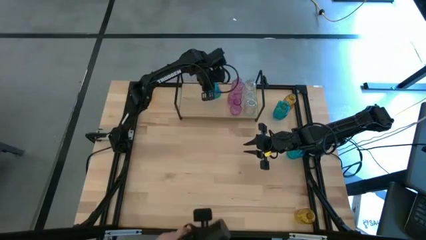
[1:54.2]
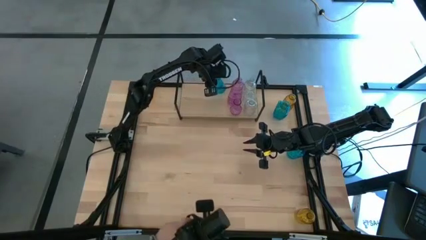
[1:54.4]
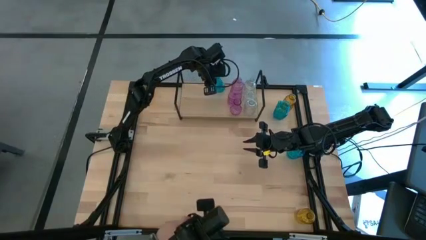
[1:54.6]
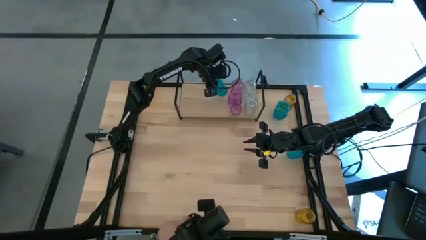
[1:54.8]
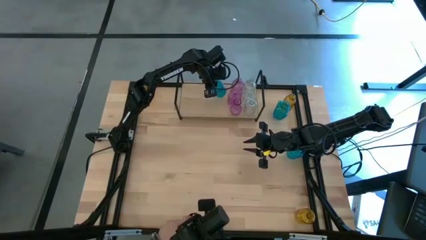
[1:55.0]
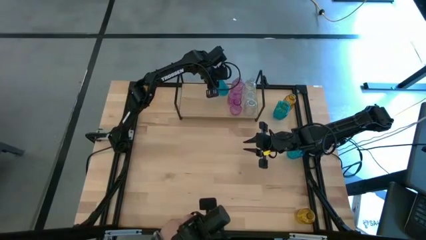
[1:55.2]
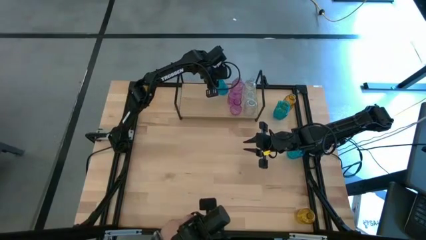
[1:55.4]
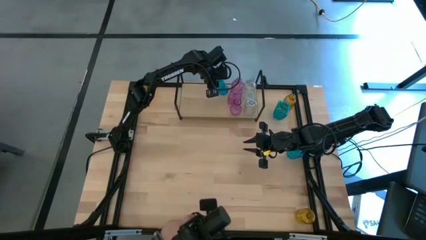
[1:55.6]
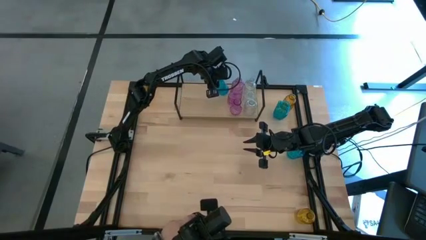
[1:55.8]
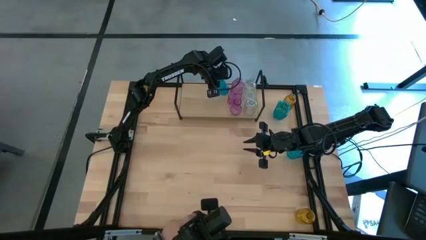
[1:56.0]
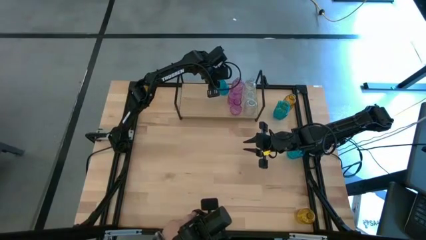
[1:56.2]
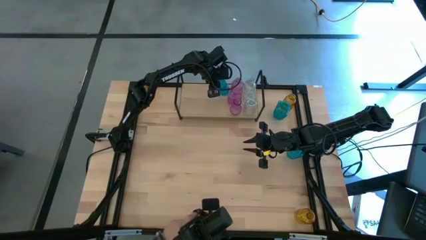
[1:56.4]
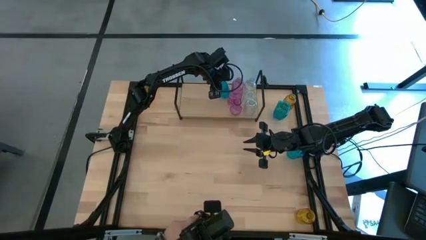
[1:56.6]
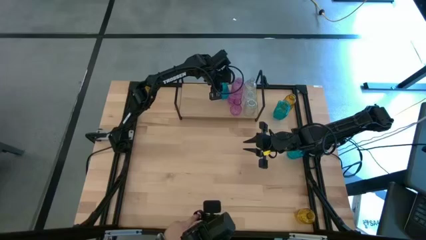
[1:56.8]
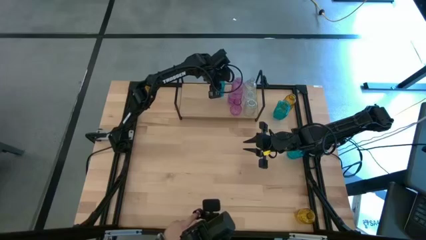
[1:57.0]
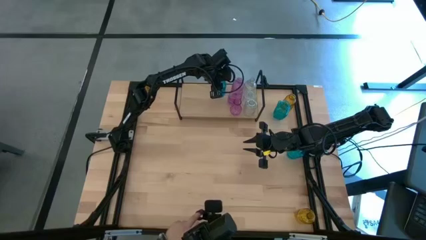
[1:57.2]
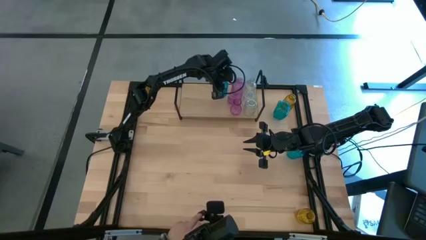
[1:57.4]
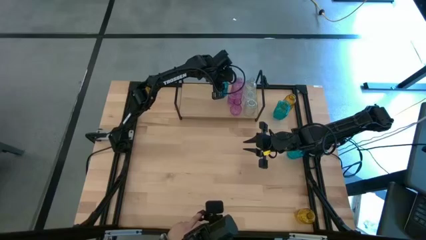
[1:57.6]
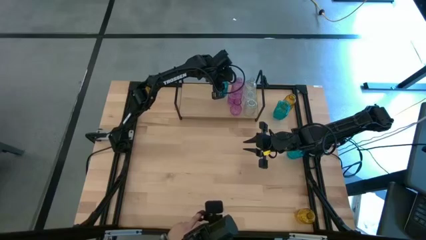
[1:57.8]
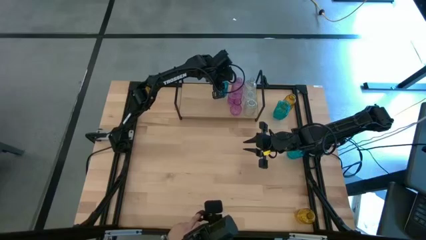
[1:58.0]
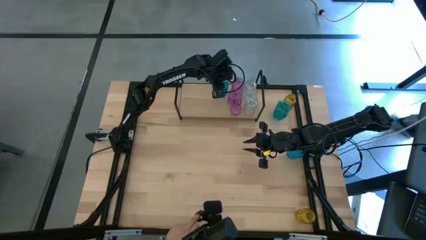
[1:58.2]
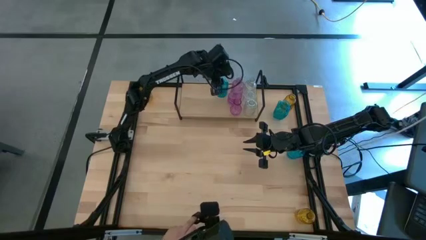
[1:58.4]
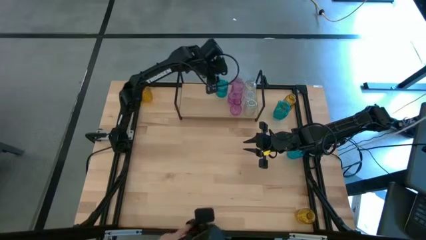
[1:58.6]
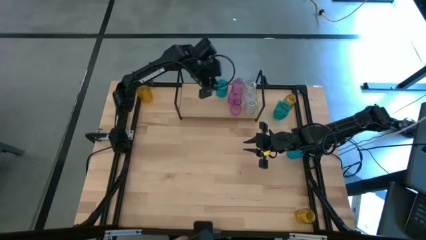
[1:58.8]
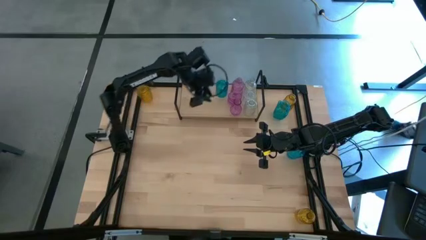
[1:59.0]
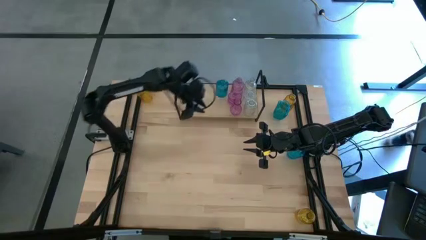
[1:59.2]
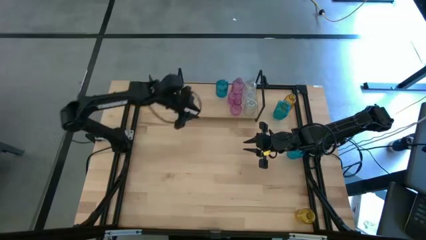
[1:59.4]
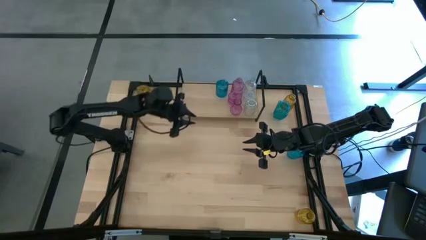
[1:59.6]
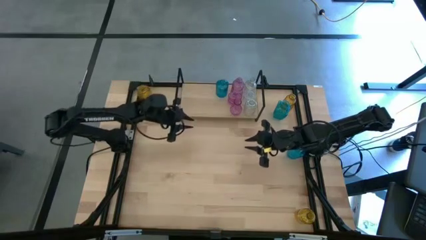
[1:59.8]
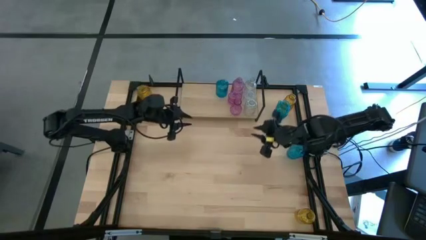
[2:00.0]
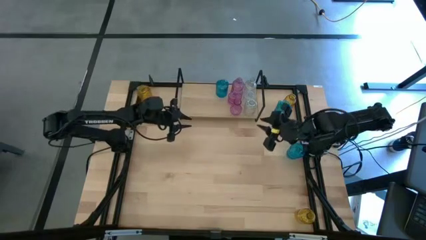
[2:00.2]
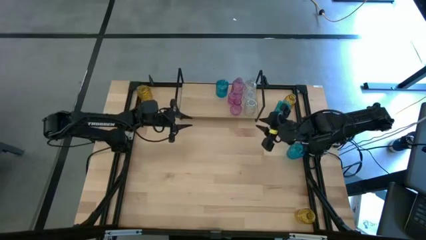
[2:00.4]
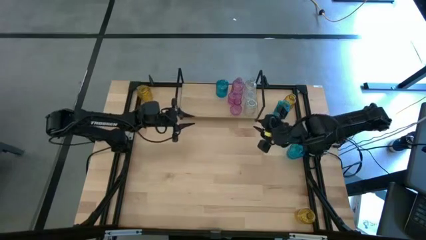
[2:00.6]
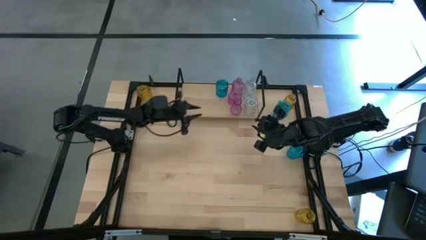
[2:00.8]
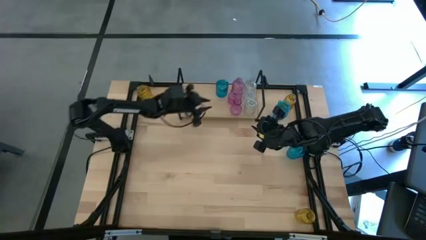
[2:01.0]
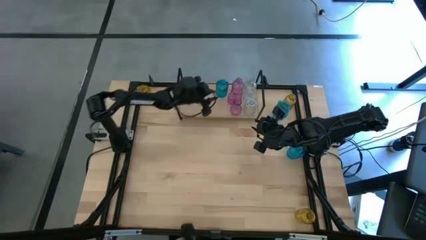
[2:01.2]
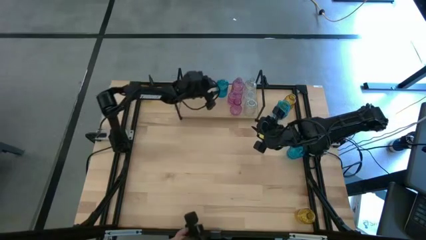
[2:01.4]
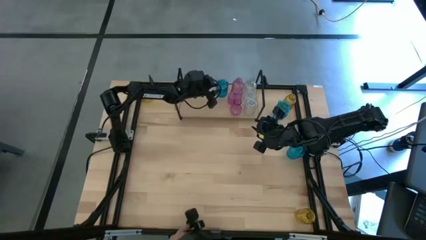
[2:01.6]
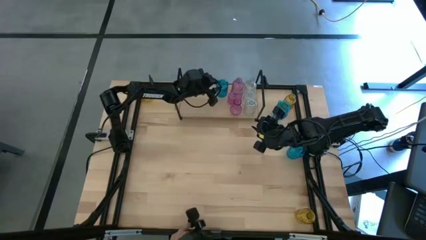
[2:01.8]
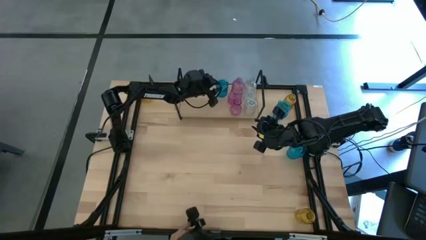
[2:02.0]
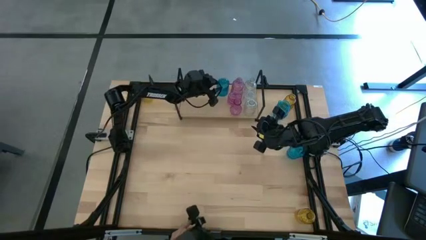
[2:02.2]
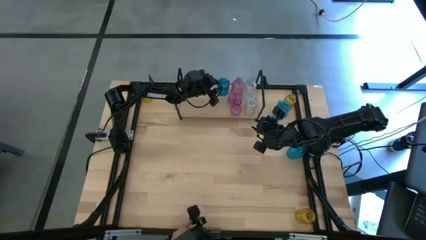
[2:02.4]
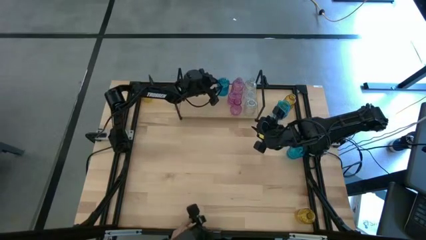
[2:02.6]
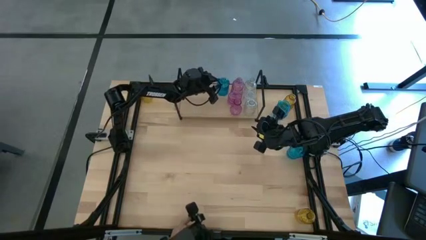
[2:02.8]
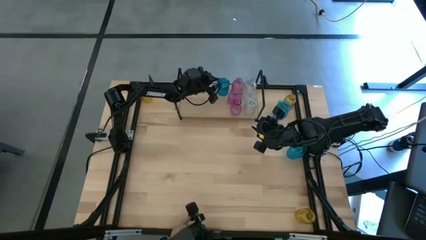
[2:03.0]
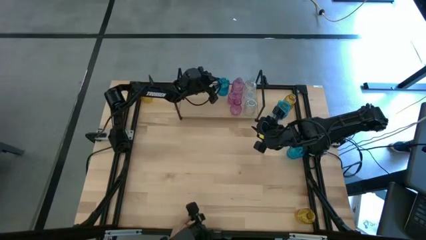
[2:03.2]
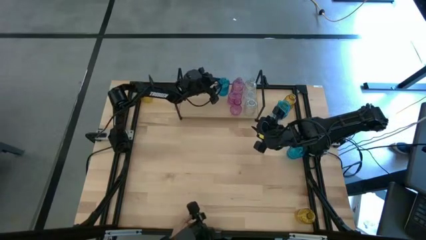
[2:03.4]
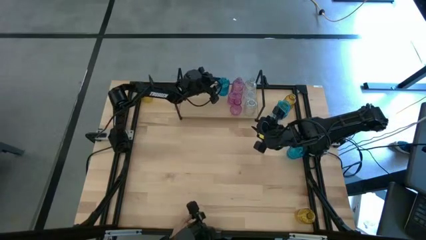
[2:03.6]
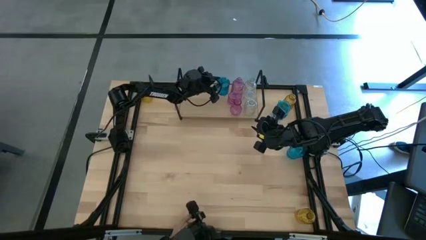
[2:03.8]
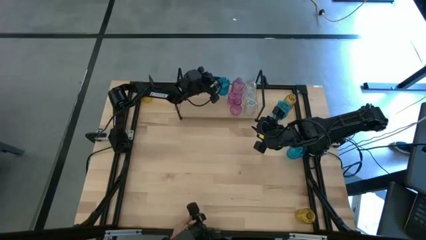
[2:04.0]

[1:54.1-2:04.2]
Task: sort vases onto shelf
Put the top left blue vase on the shelf
